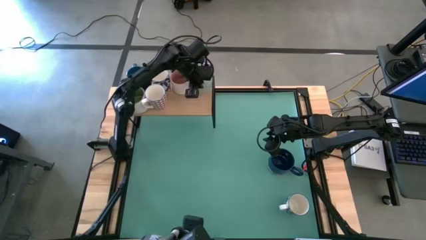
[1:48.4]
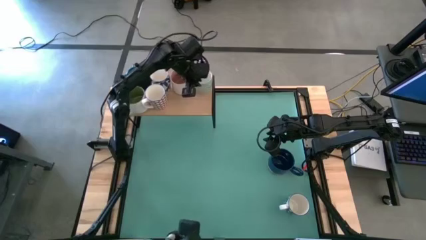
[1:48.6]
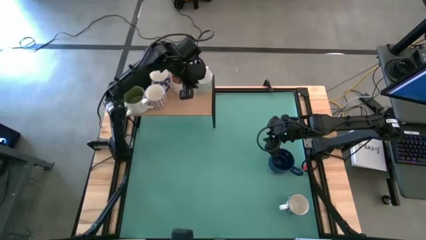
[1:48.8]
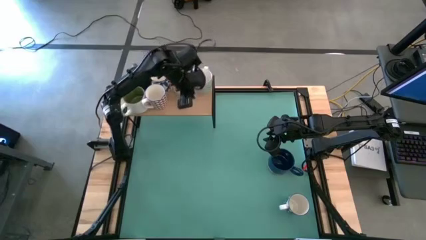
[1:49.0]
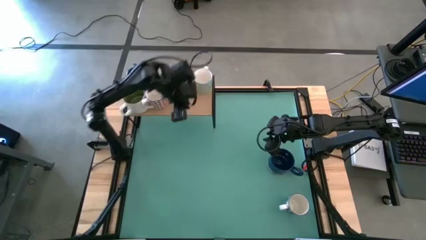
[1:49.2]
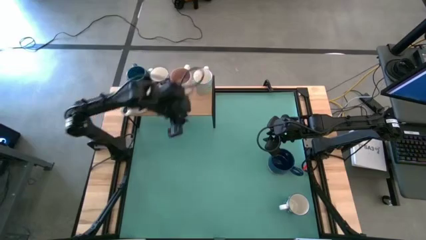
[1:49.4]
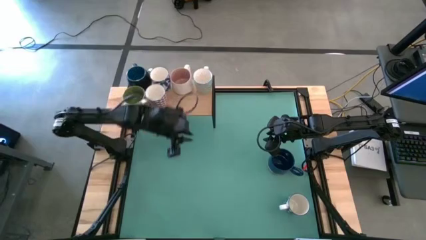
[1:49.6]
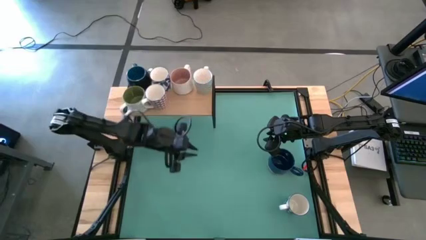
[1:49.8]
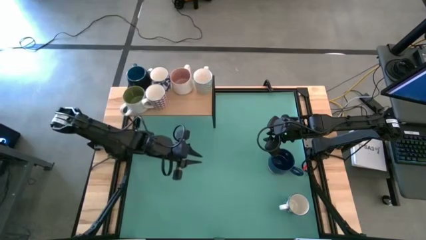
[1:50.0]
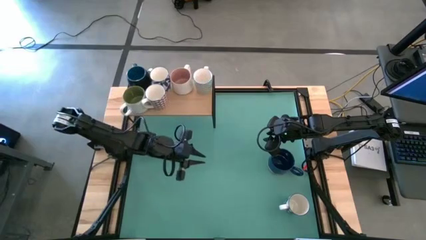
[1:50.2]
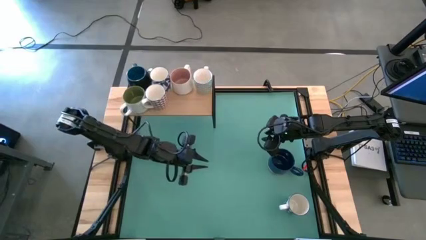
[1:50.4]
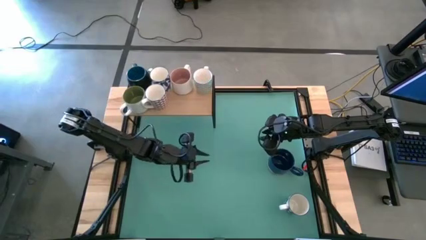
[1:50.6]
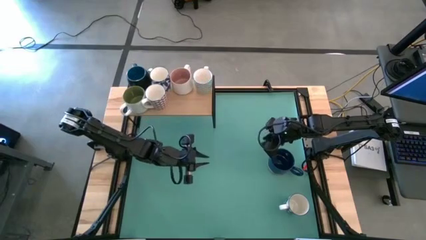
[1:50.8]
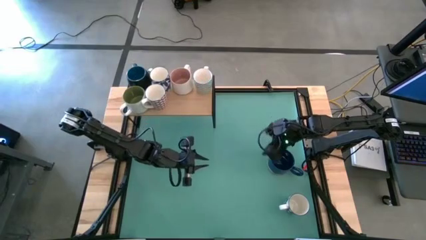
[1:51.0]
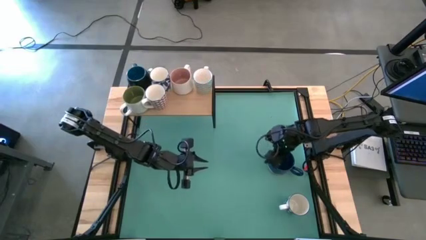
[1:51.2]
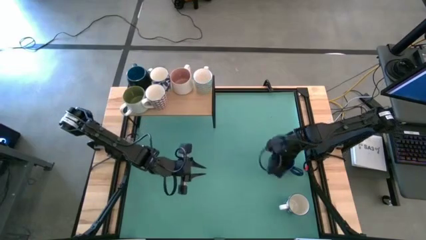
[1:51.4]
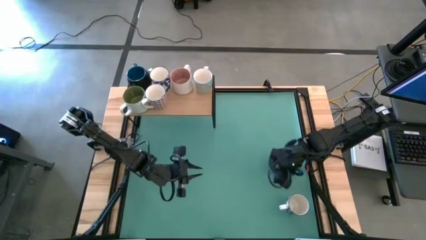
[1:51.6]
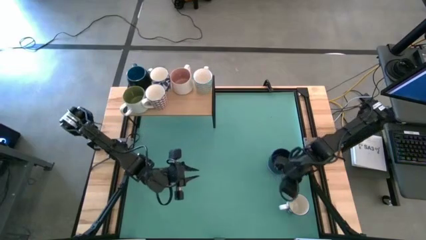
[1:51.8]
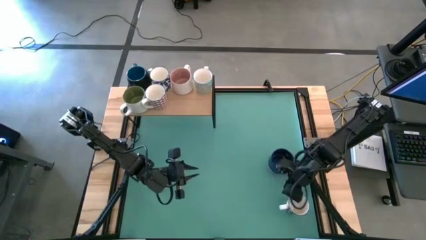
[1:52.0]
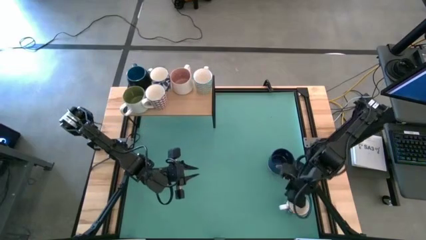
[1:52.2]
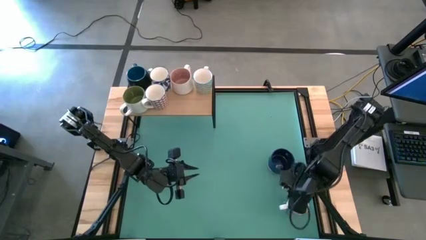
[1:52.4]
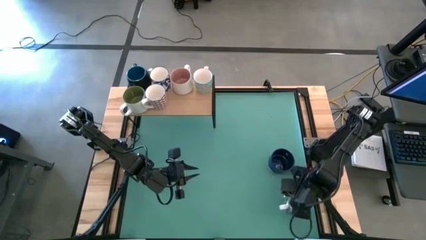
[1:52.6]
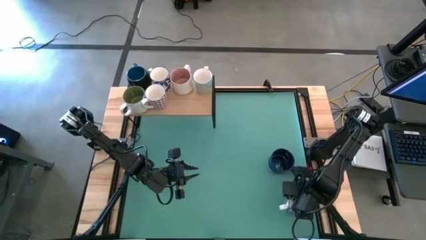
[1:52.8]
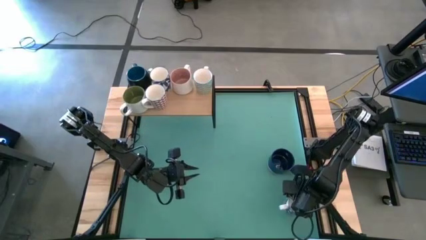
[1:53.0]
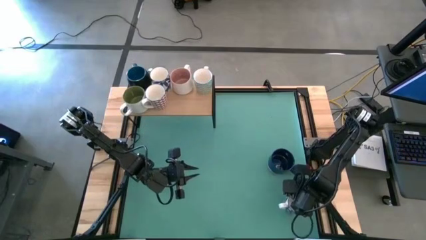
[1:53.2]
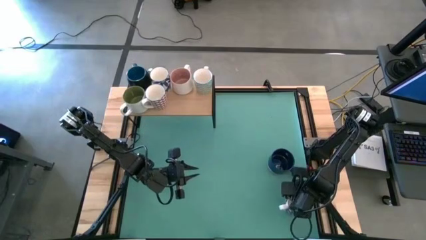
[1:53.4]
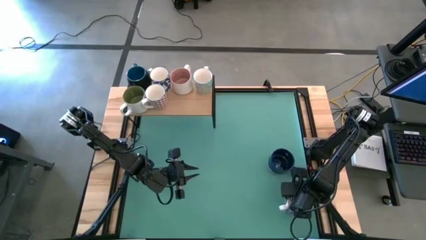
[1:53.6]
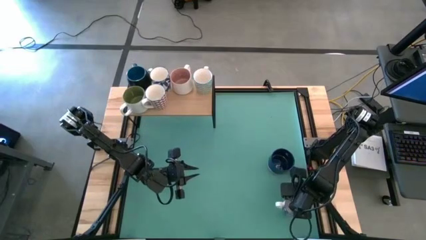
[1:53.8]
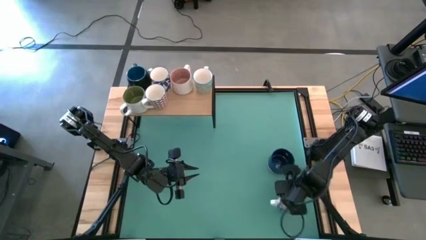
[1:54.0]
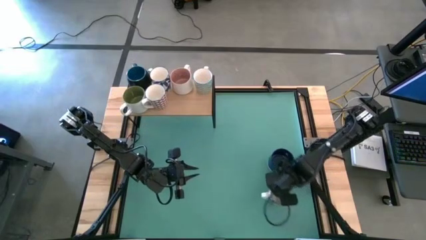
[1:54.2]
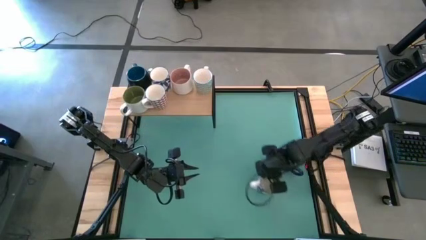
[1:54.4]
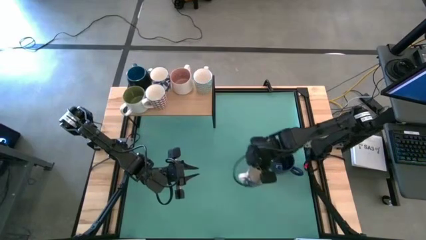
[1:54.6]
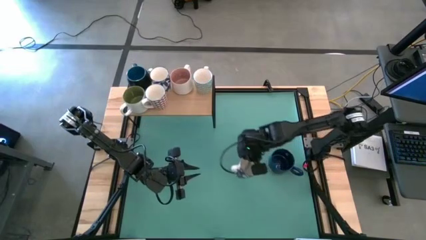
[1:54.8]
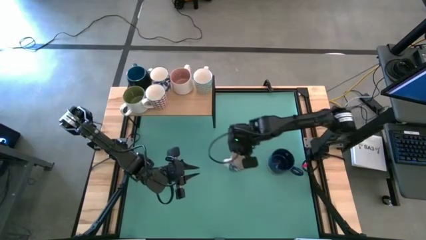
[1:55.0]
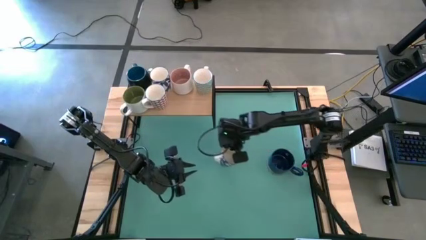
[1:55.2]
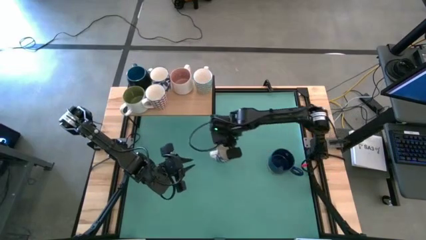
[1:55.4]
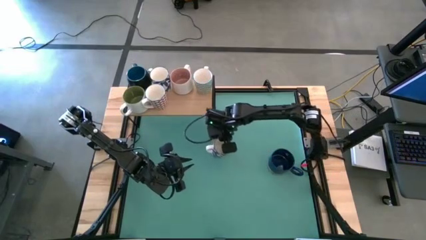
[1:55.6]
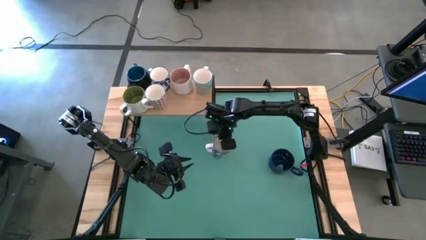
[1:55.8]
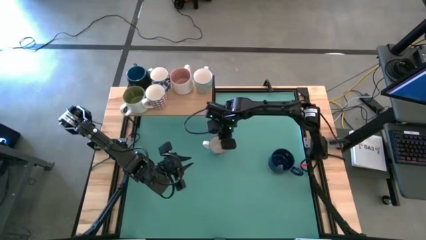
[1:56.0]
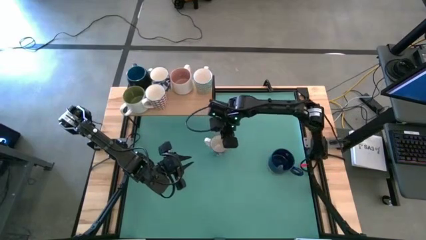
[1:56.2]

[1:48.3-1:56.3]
Task: Place coffee mugs
Move the white blue patterned mug to the center of the table

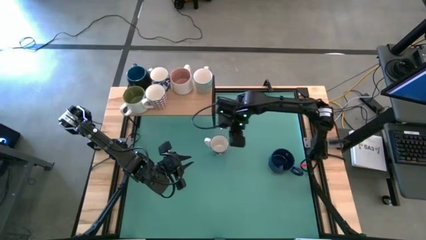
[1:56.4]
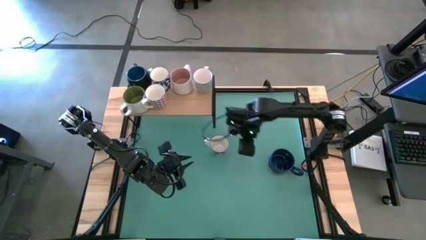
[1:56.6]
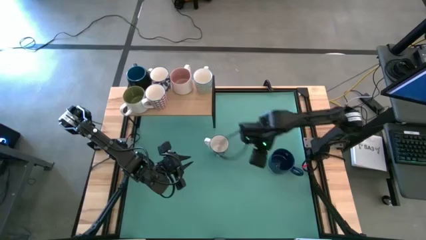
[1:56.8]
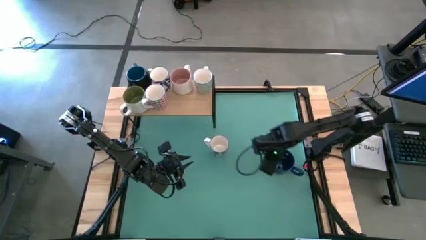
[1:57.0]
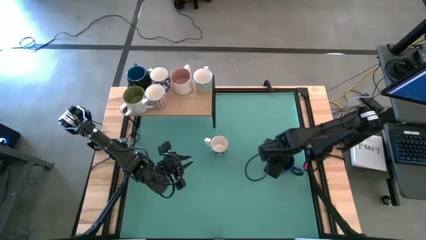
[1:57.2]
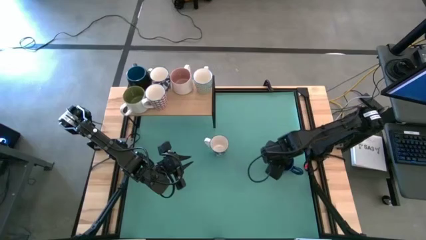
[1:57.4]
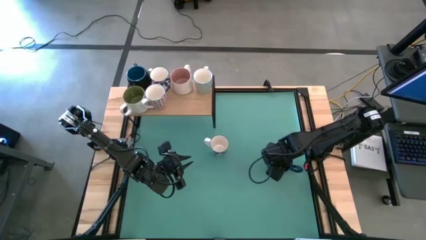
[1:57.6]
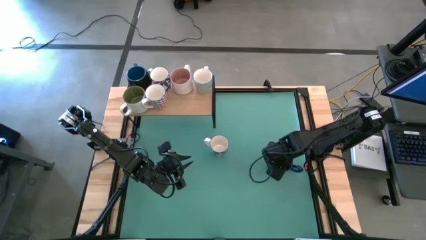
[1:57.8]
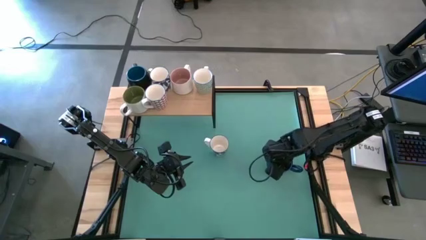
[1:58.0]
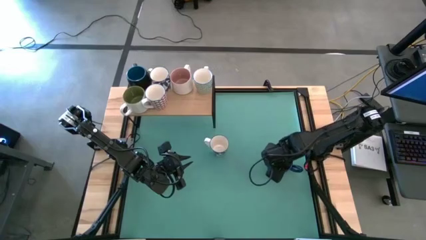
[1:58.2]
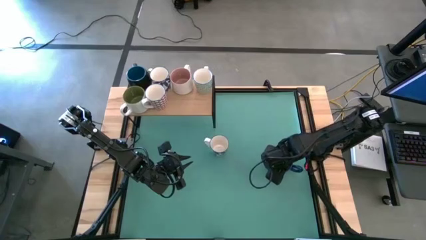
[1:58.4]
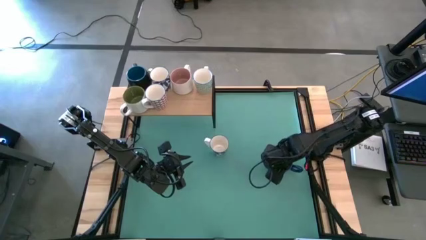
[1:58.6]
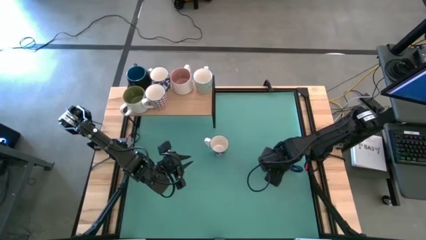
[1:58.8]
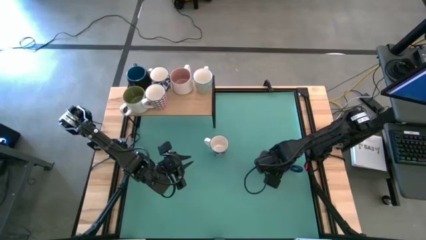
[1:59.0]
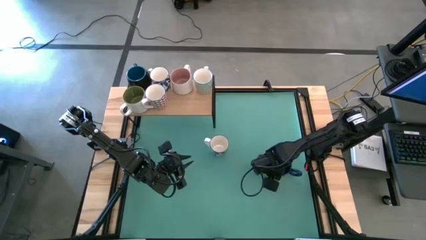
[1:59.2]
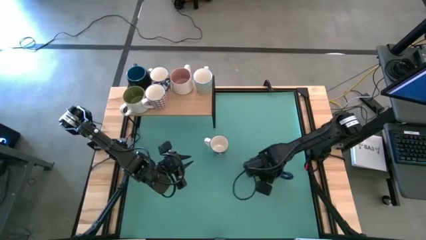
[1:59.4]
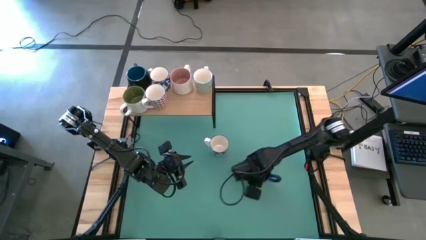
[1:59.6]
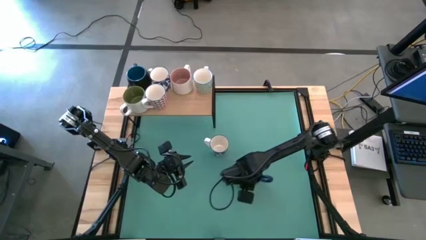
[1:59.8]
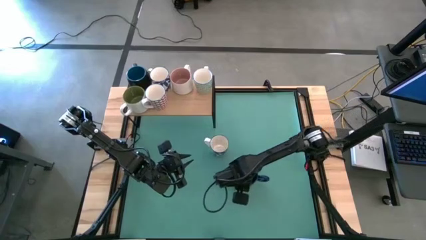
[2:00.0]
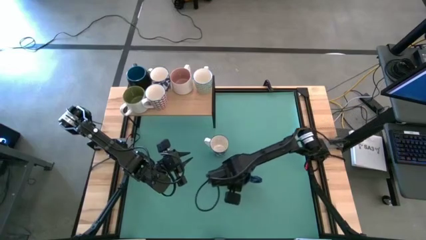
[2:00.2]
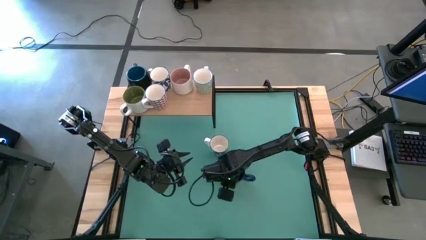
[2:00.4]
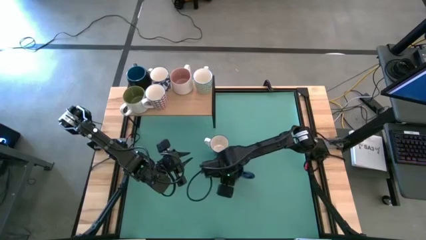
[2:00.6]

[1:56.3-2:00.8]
Move the blue patterned mug to the center of the table

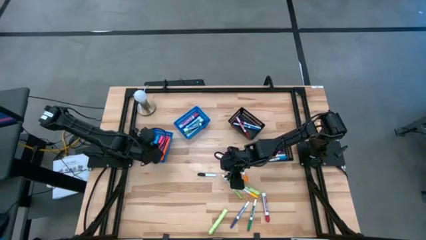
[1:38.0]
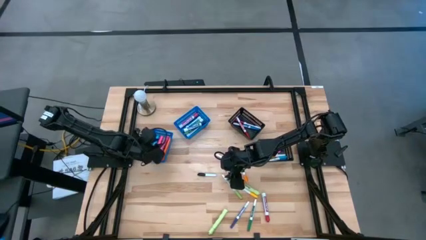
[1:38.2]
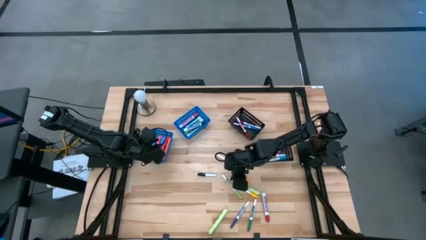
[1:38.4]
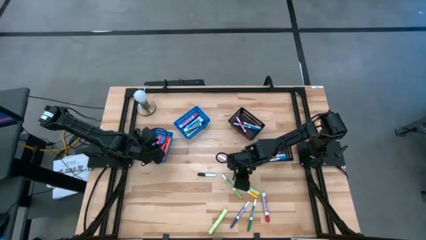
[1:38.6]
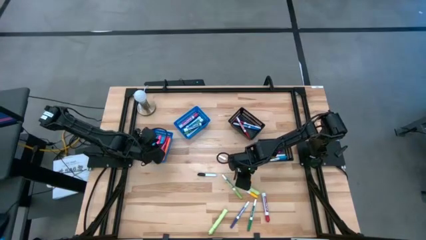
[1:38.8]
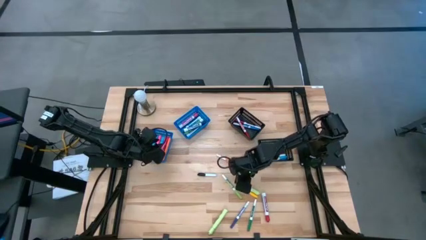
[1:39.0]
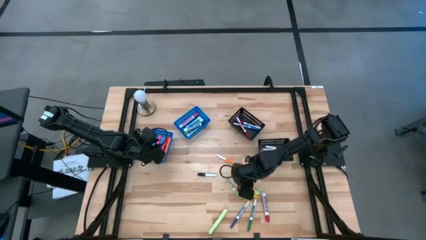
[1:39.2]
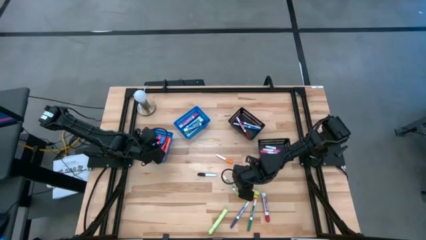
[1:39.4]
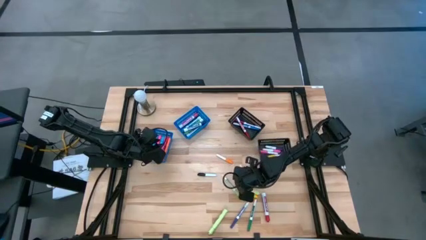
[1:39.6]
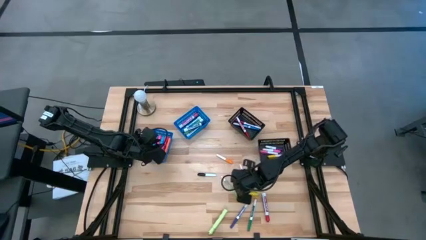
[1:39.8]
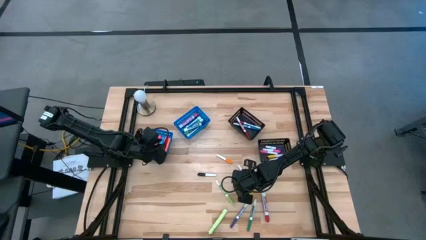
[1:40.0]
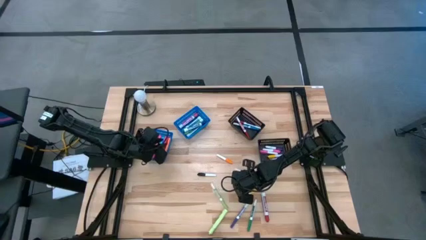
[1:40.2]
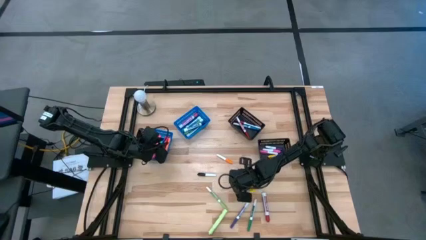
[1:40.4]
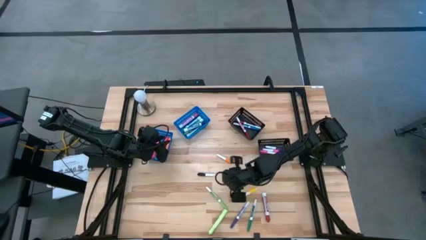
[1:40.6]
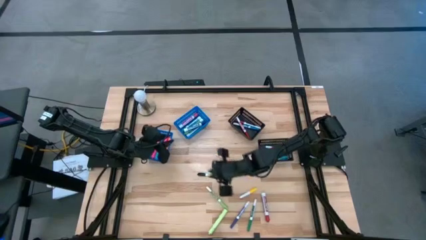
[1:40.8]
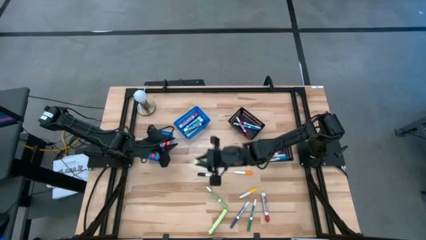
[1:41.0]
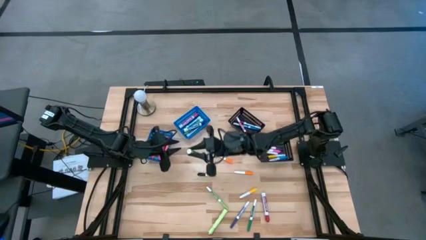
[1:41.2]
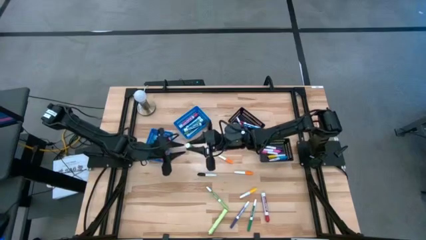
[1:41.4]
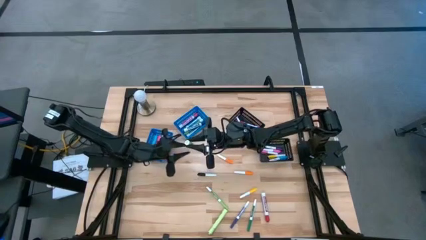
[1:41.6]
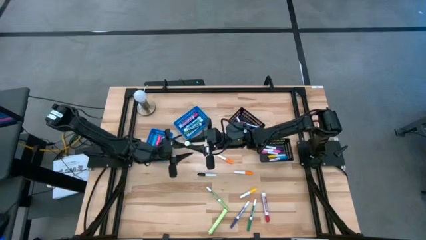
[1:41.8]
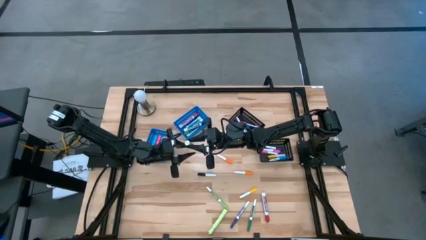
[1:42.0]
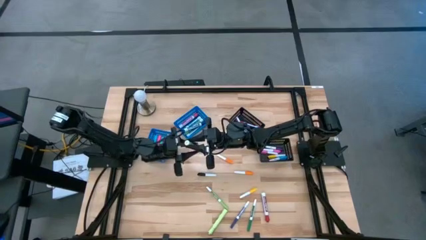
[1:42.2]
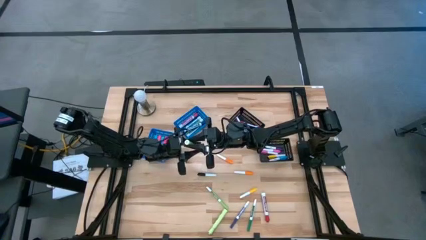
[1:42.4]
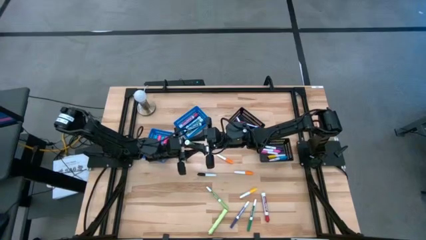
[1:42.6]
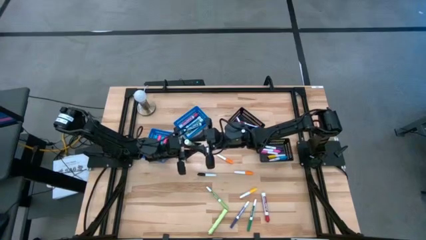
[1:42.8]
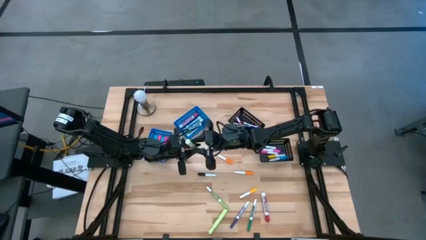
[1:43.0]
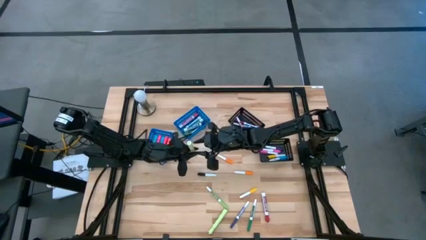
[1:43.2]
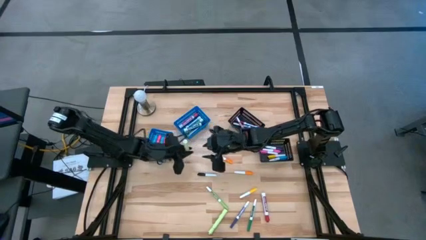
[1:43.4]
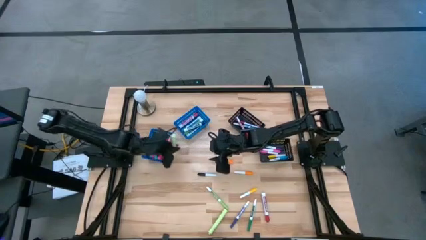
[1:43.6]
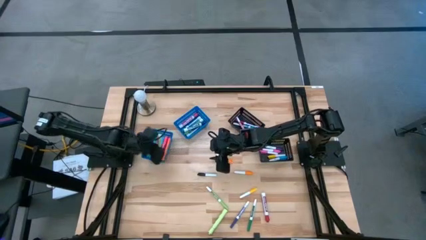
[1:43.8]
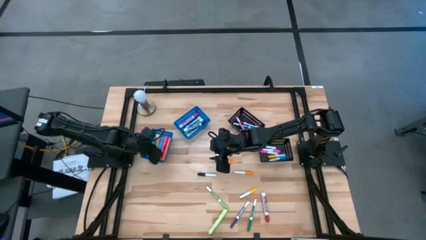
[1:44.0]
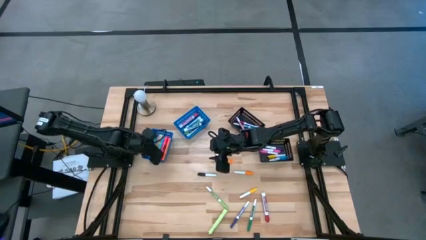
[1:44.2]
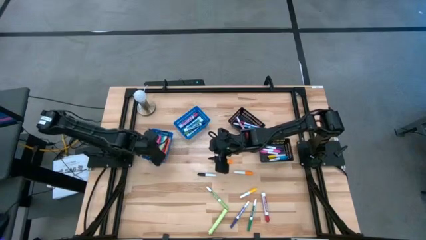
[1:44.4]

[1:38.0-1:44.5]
Task: Pick & Place Markers
Put the top light green highlighter pen into the left blue bin
